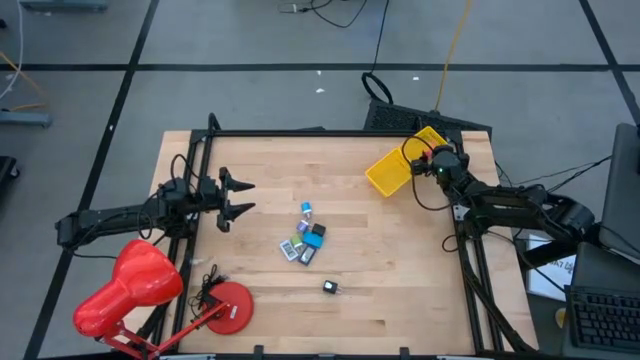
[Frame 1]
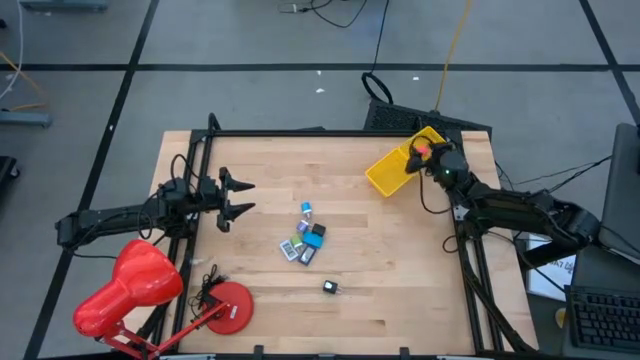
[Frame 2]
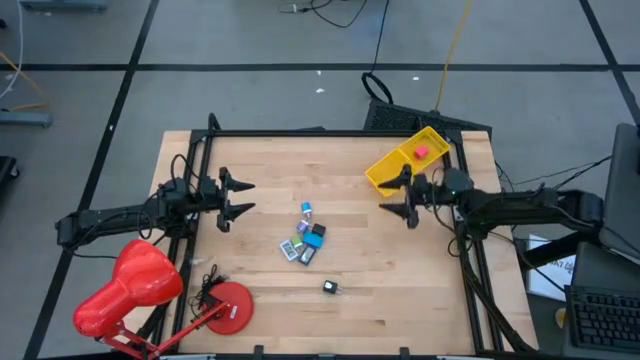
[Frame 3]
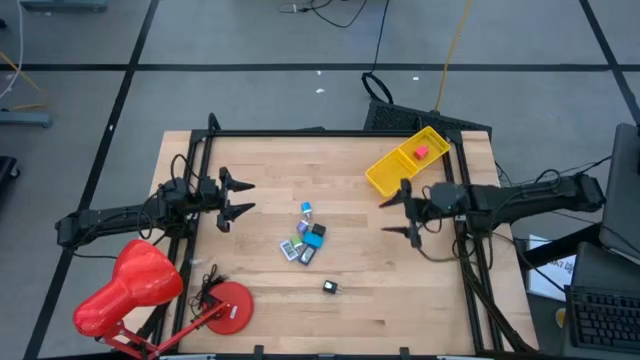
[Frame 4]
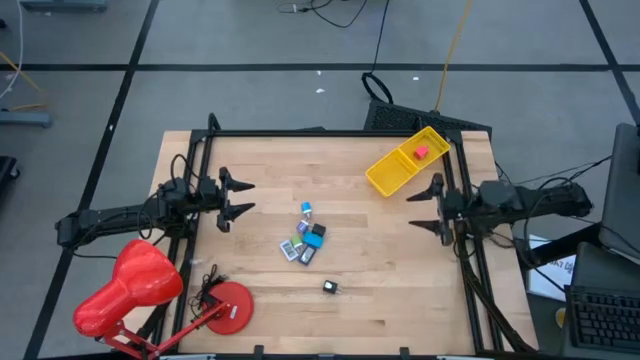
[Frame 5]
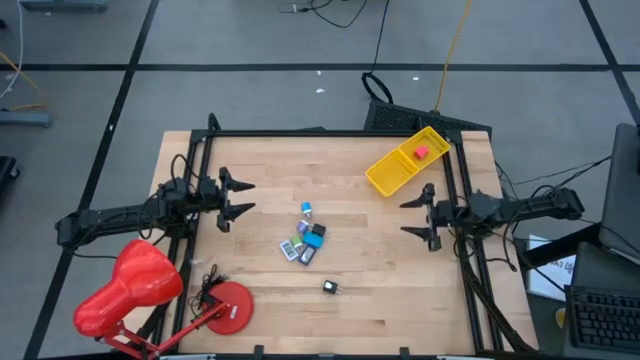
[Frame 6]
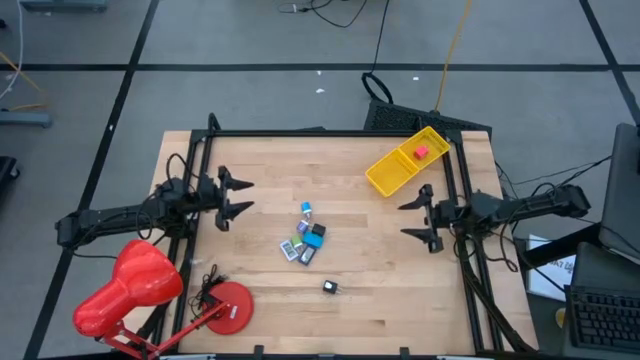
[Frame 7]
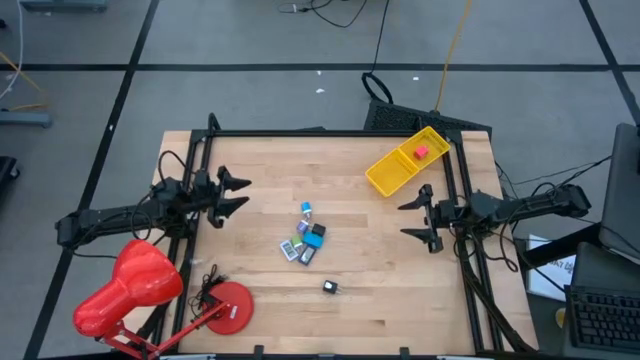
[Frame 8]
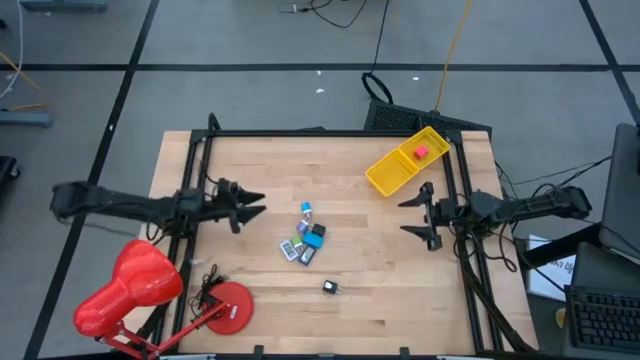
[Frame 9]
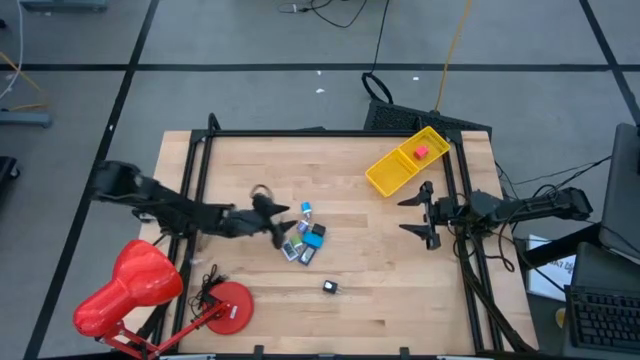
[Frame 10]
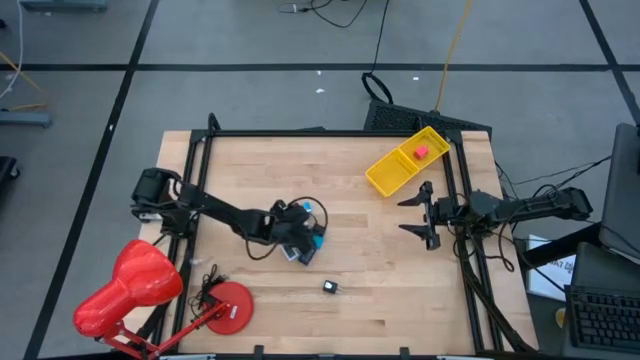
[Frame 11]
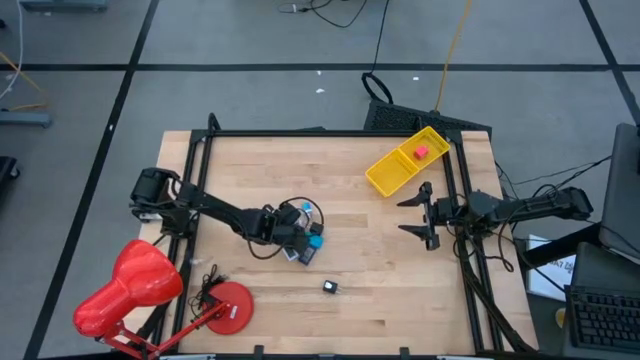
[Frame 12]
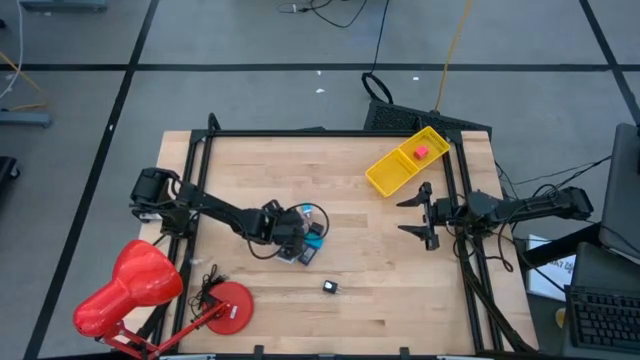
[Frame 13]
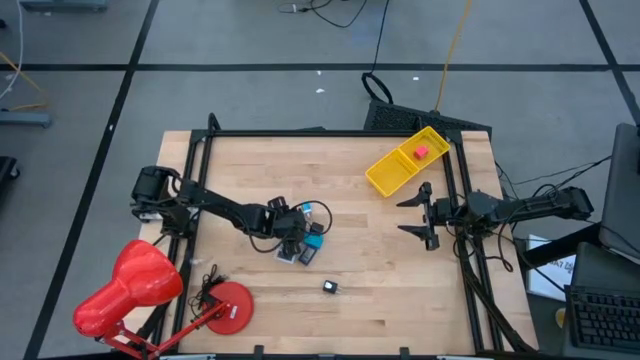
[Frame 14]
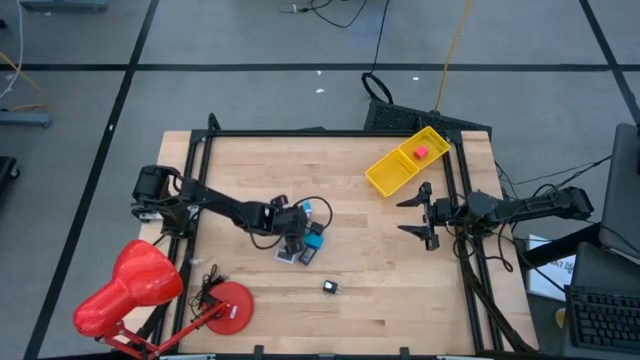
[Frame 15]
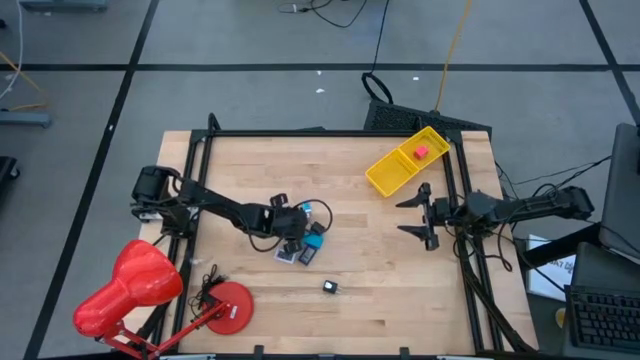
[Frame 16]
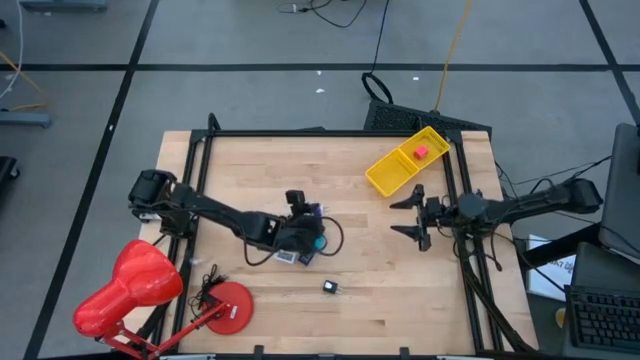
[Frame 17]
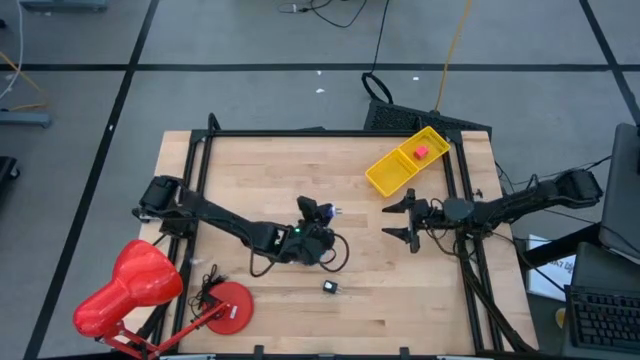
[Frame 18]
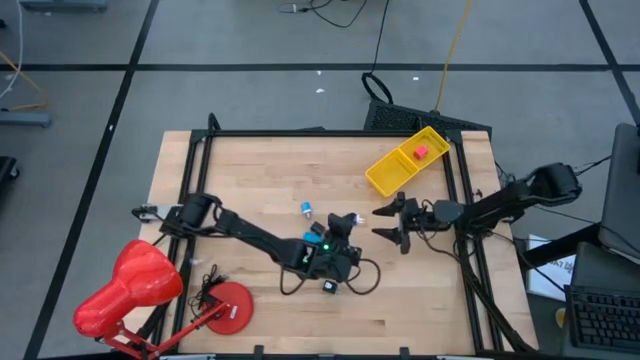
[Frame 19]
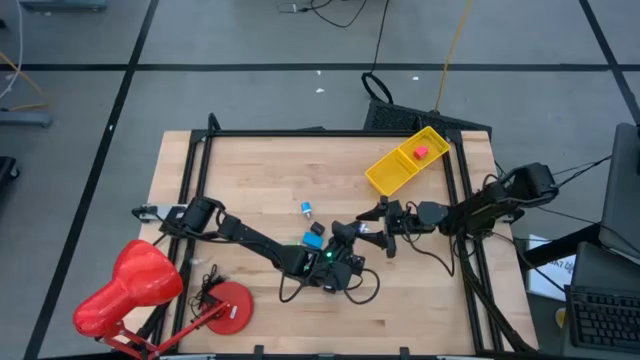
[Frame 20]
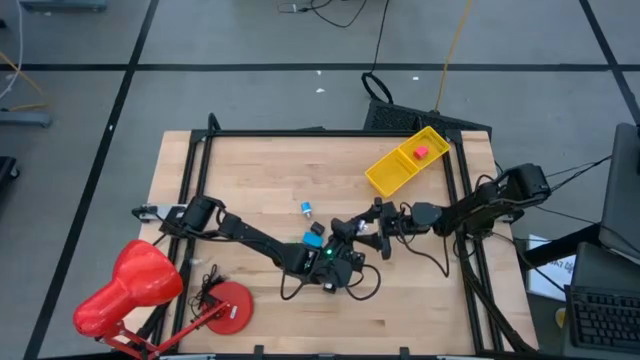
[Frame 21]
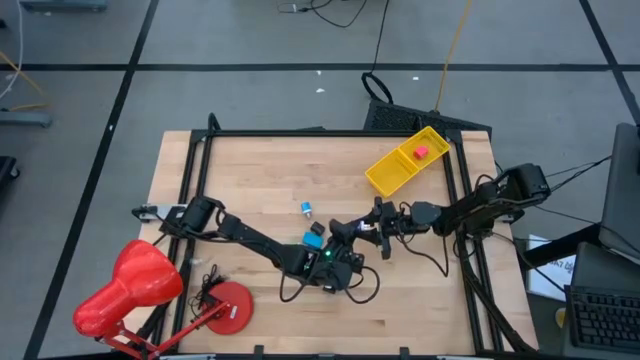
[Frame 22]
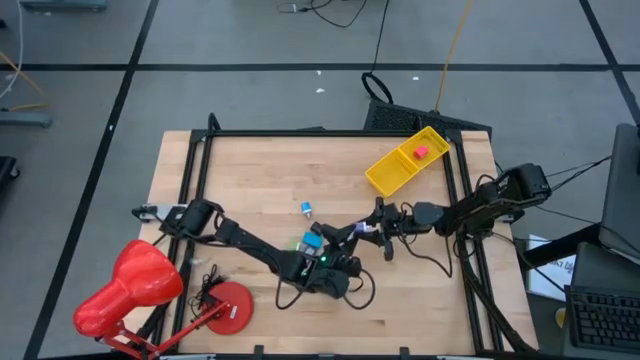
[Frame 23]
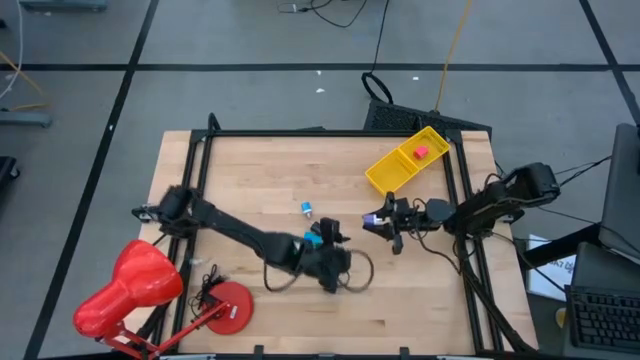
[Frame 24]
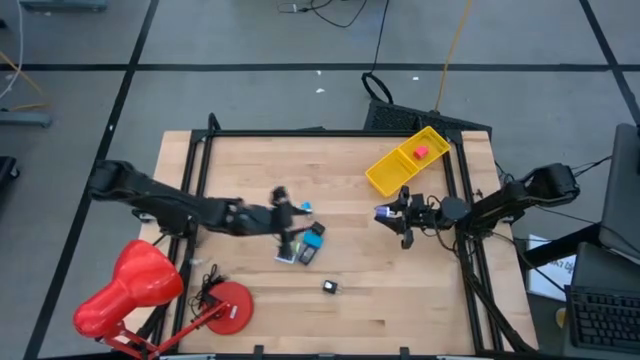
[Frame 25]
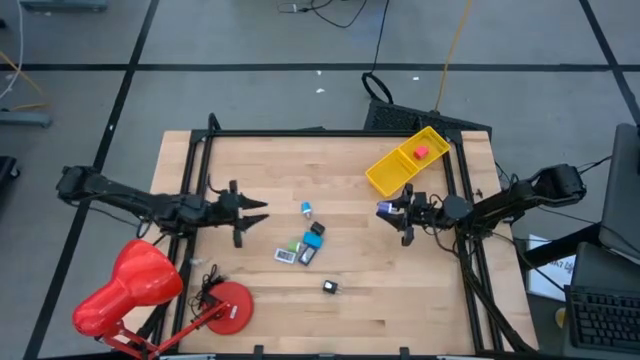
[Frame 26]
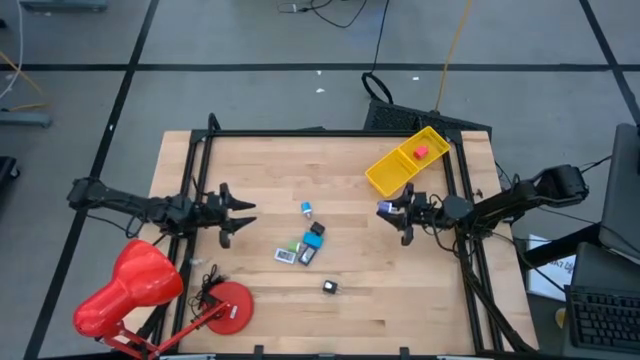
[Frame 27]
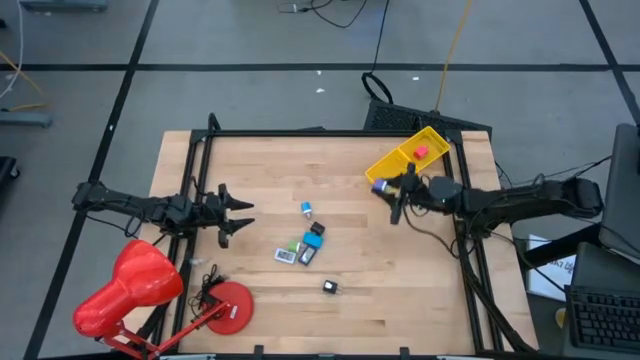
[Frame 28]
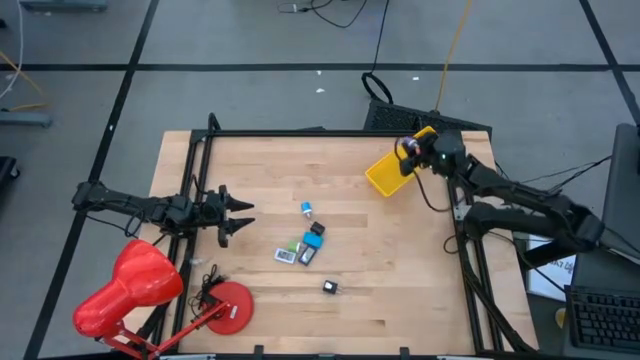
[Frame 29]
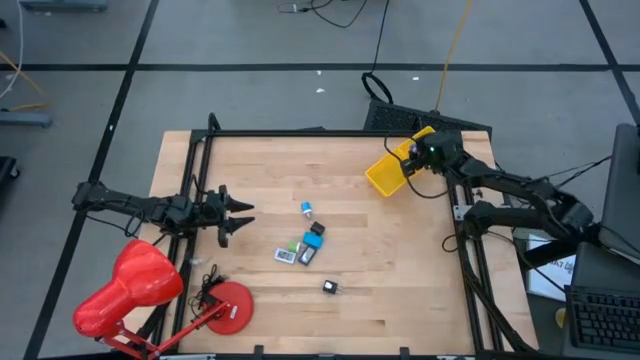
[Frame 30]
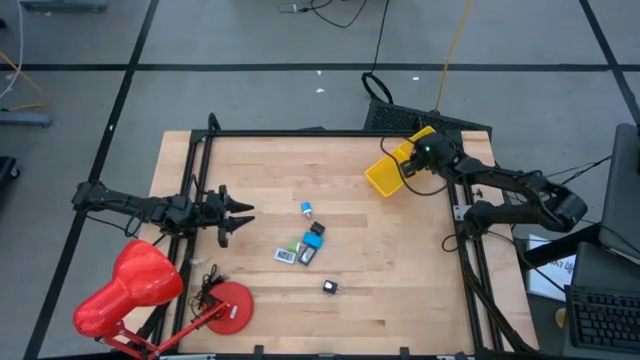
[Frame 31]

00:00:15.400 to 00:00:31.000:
Task: Pick & Place Office items
Put the dark blue charger adapter into the top yellow basket

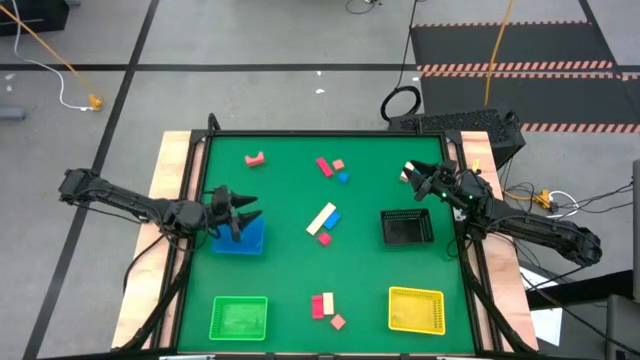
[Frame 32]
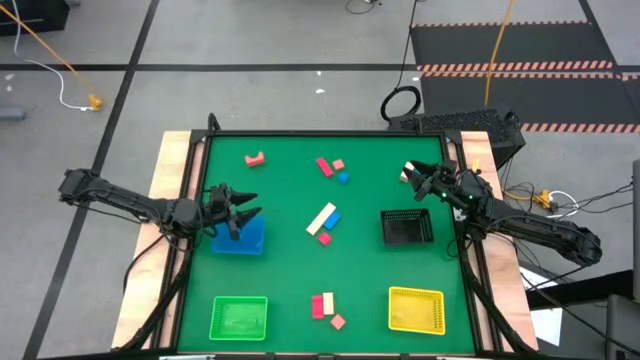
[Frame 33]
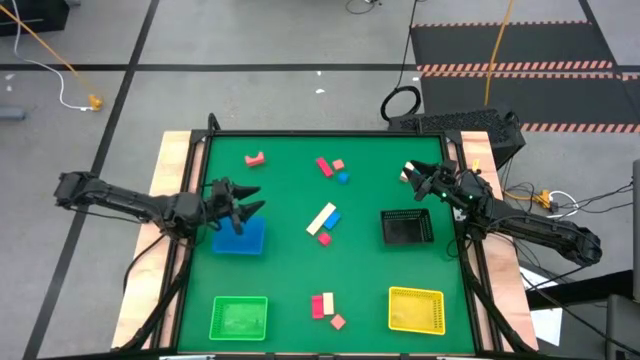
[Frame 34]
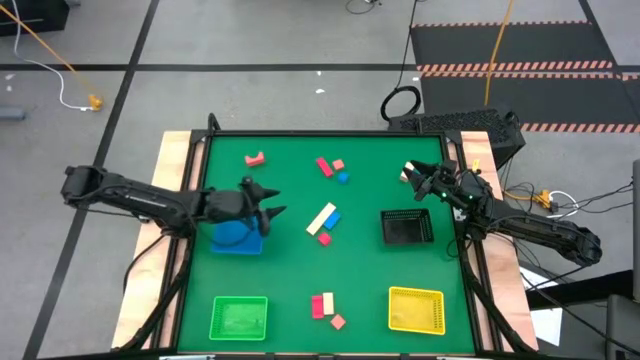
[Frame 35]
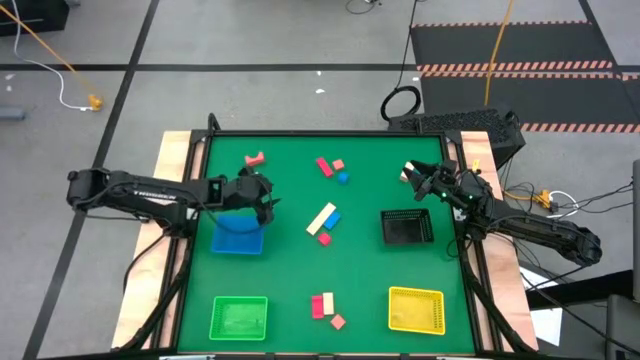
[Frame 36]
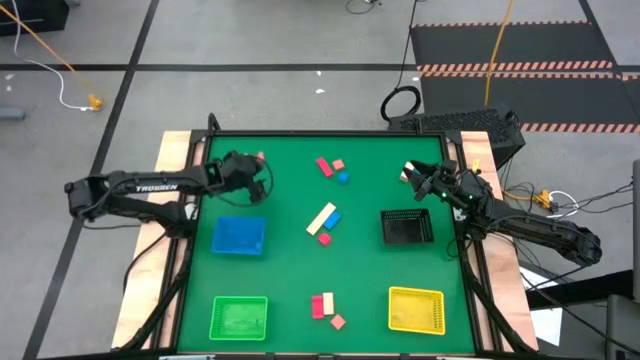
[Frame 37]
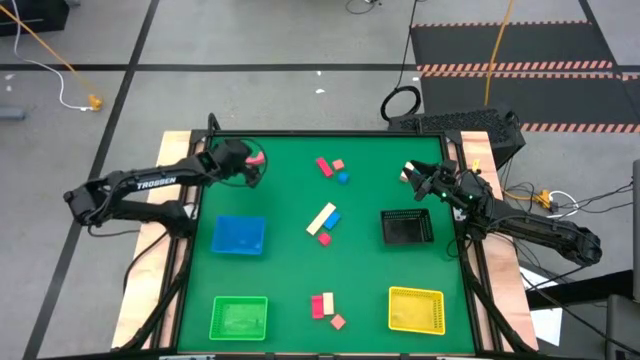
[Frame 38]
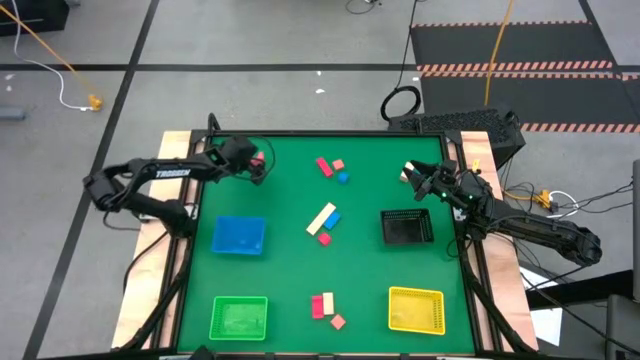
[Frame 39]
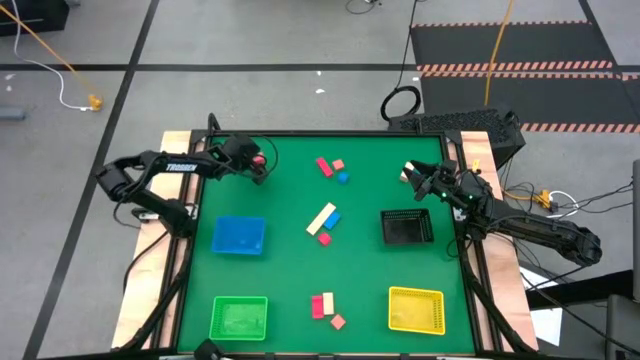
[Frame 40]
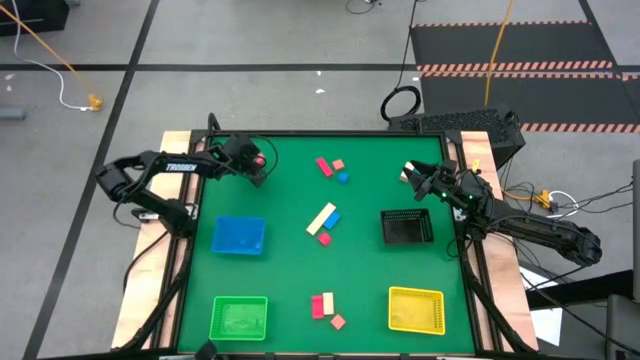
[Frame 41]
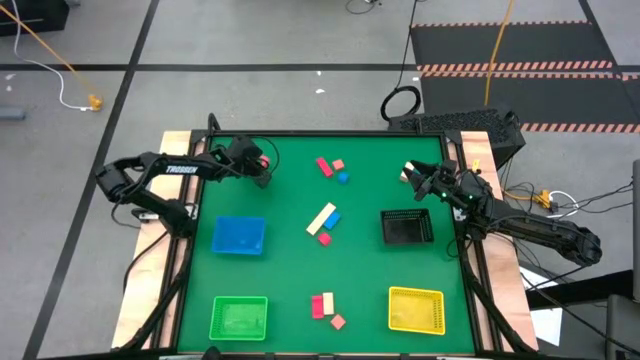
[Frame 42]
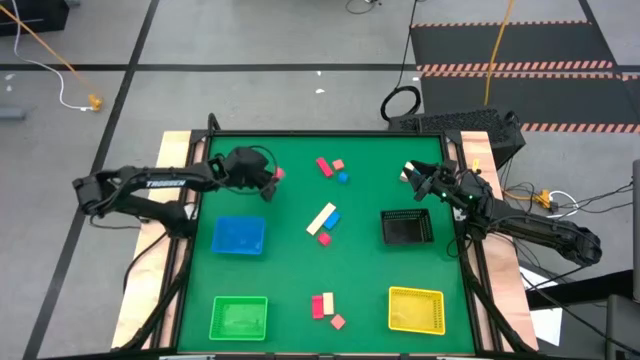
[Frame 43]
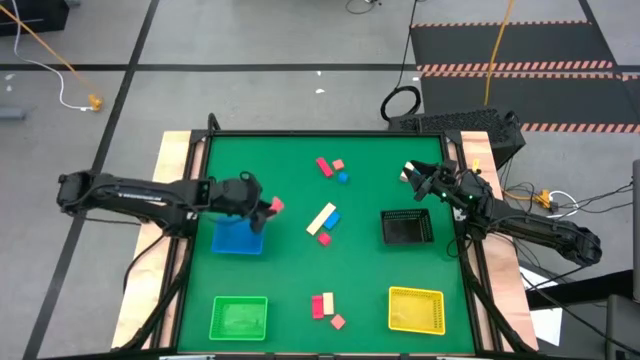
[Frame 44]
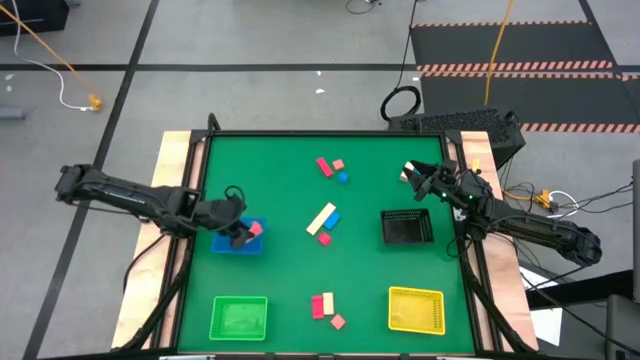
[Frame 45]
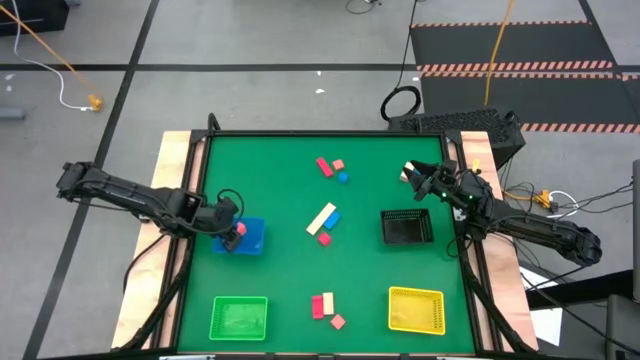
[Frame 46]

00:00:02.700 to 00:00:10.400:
Task: Sort & place blocks by color
Put the top left orange block into the blue bin
